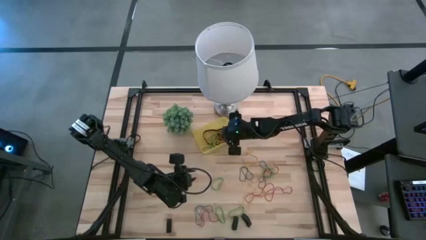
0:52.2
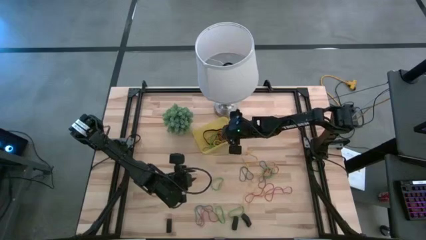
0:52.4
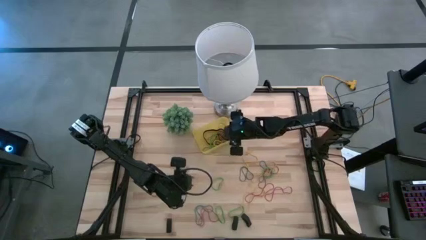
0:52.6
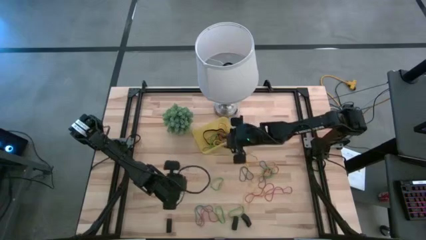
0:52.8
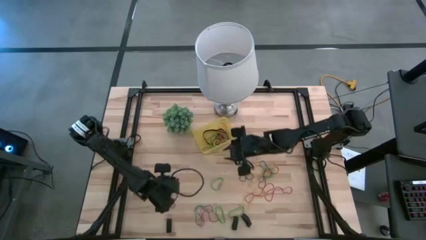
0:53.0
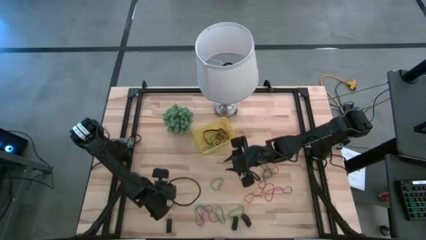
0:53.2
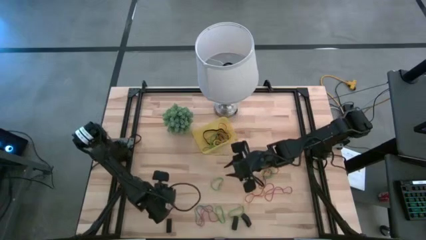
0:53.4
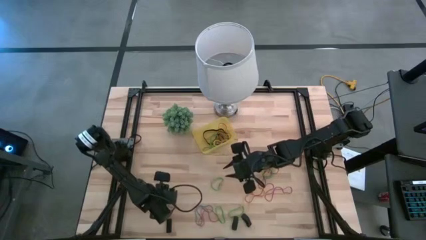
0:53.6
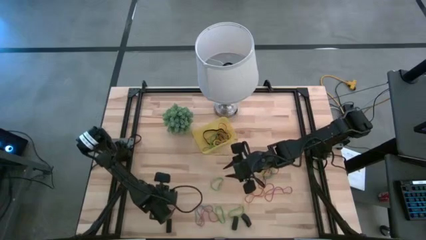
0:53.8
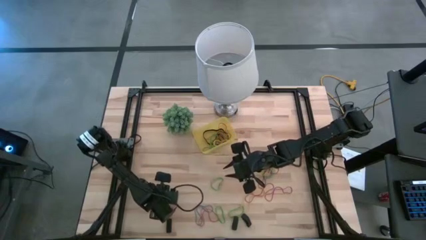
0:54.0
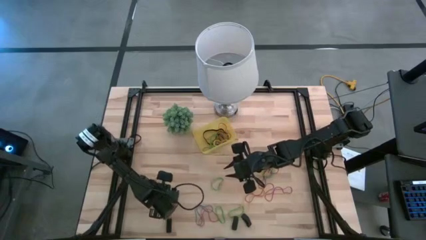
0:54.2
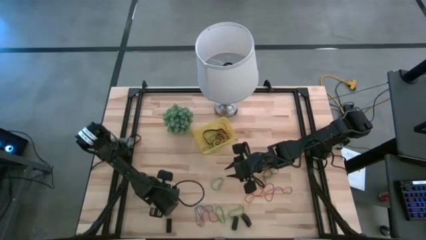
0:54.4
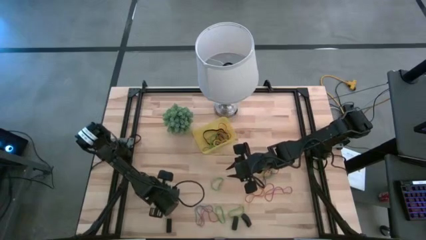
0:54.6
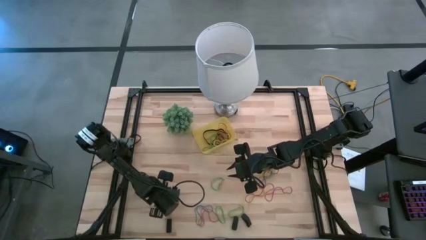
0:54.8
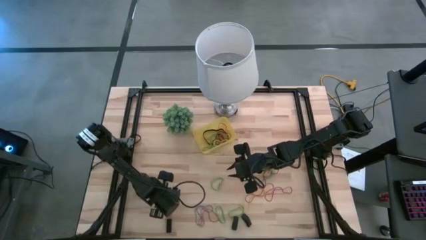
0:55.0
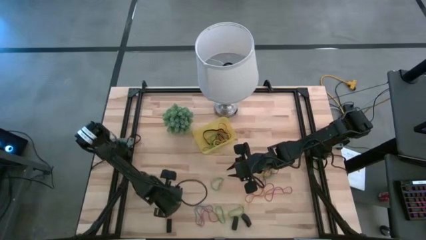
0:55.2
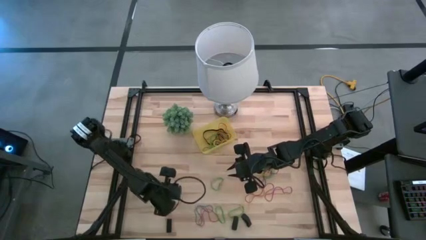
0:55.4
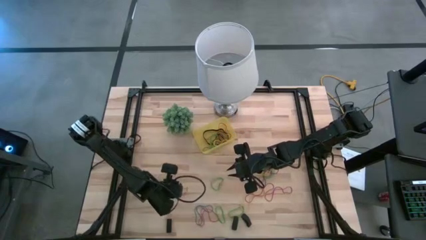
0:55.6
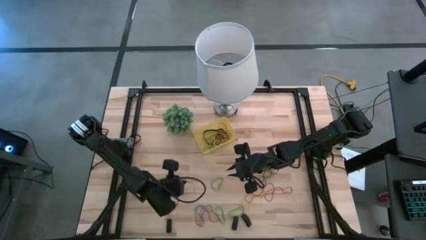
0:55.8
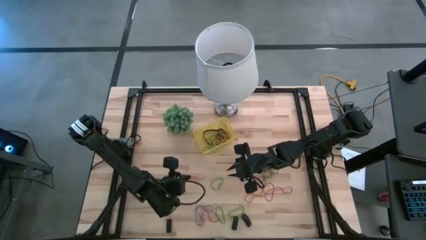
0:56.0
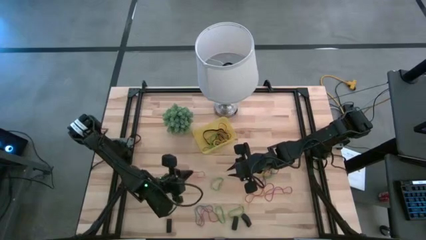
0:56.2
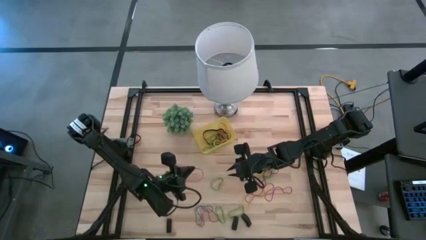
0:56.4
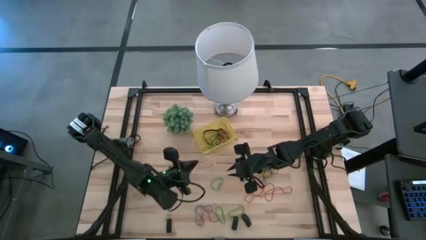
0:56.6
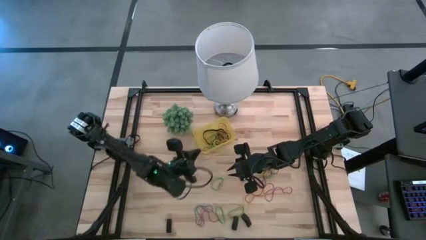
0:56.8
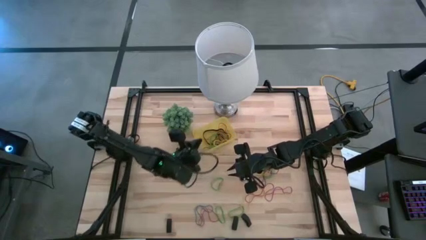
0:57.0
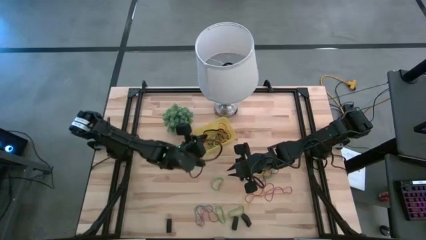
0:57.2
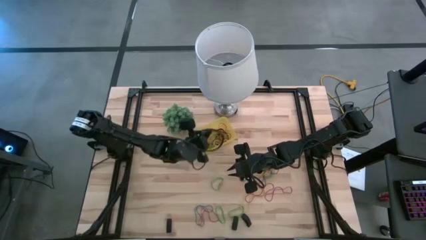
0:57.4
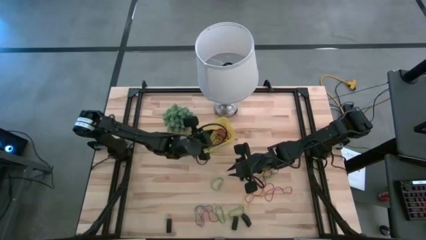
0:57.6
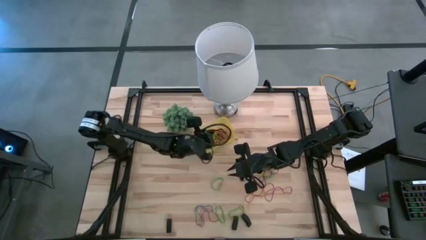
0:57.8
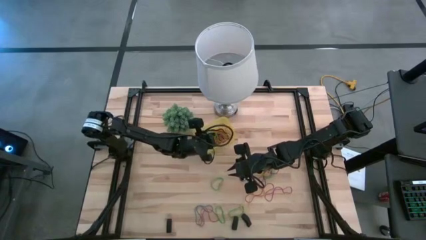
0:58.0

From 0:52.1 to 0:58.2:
Task: Pick and place rubber bands into bin
Put the red rubber band into the yellow bin

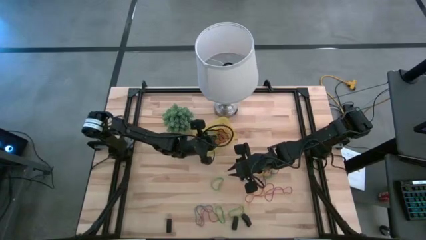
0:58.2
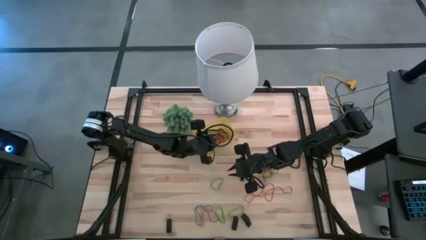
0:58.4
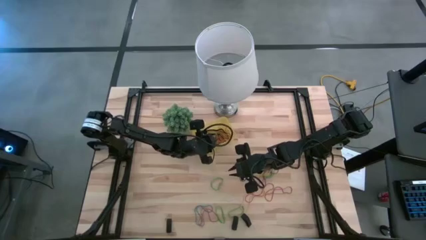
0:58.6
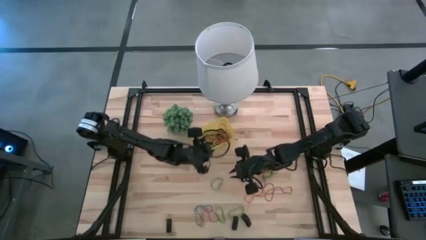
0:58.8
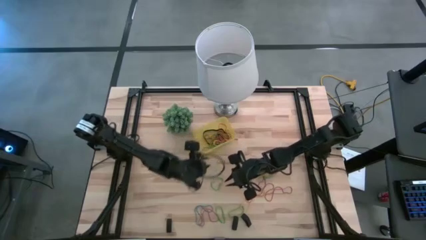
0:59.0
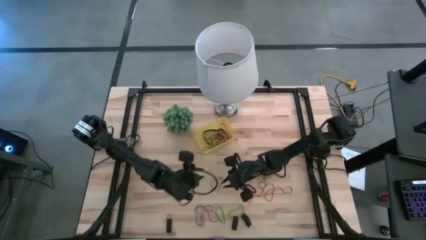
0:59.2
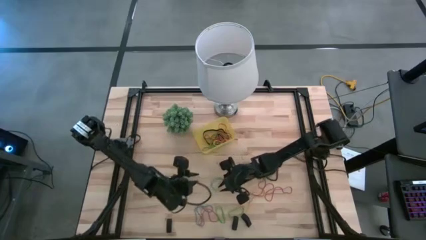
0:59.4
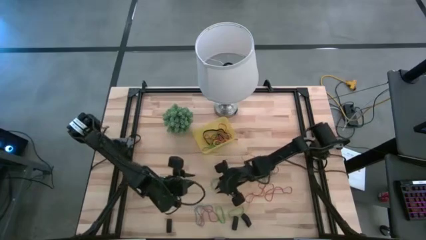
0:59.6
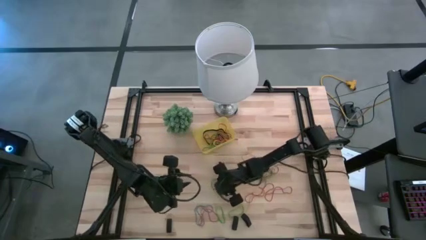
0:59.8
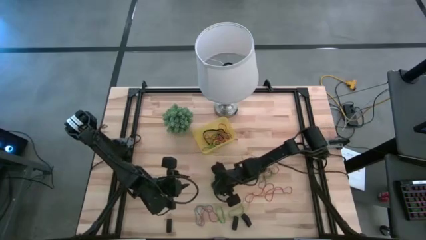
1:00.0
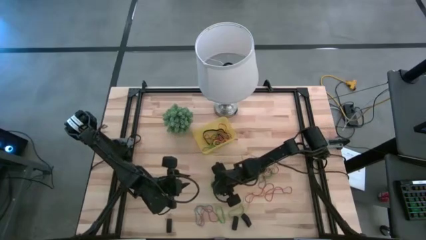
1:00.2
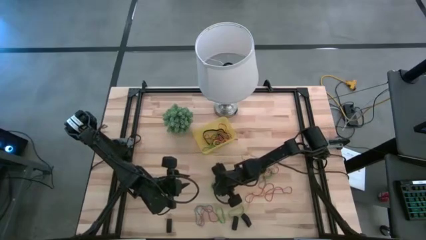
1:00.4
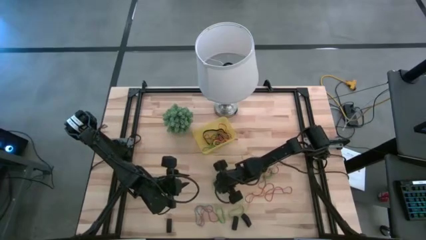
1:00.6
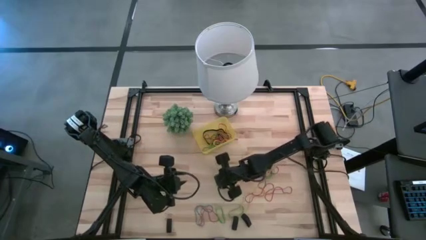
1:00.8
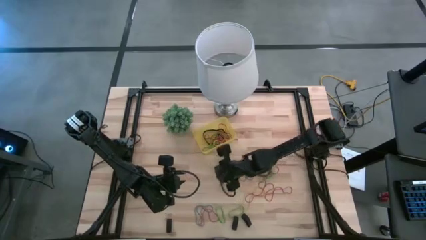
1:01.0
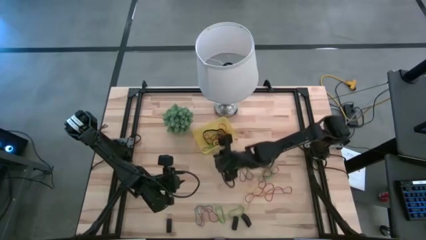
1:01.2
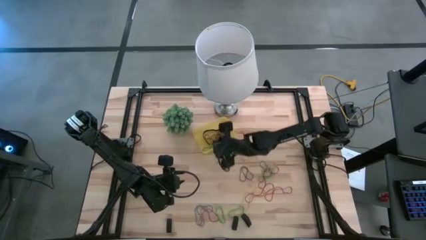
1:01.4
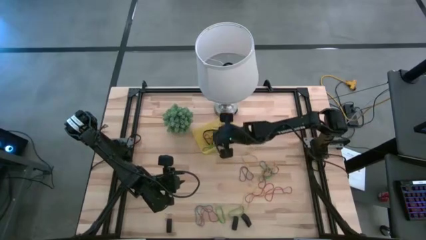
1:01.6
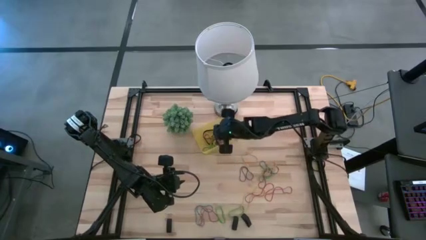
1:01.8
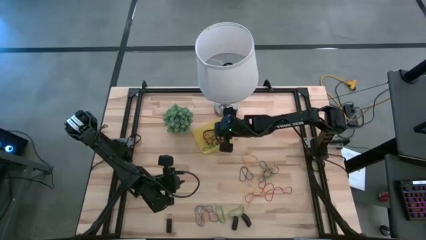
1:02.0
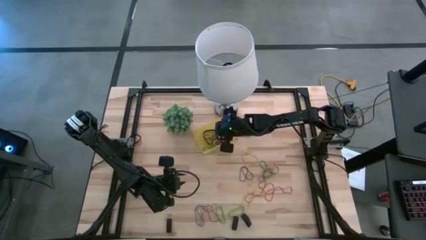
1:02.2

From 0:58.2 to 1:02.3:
Put the green rubber band into the yellow bin

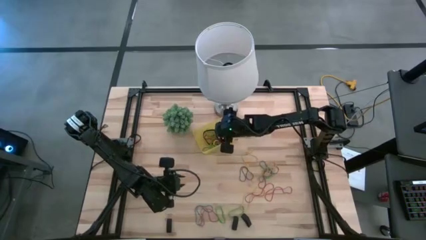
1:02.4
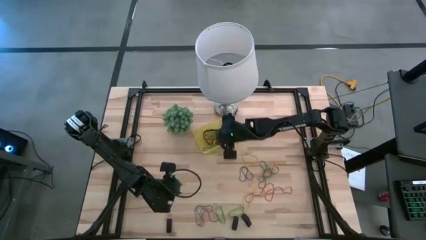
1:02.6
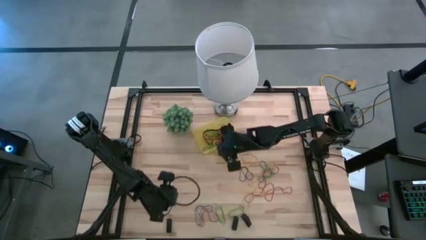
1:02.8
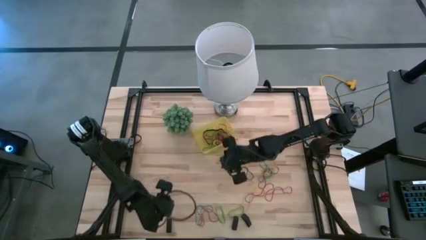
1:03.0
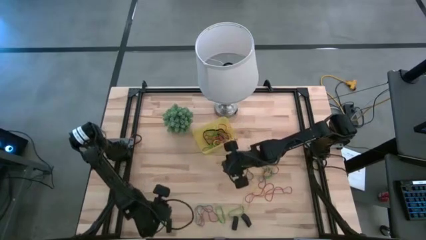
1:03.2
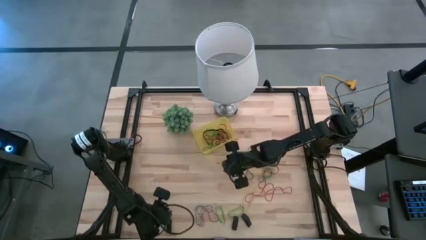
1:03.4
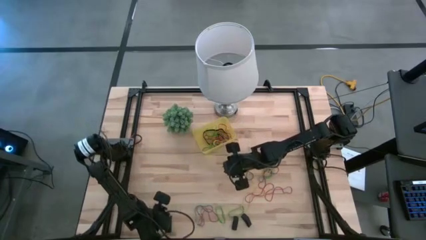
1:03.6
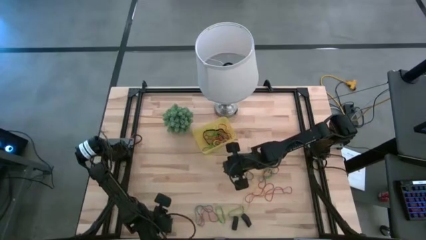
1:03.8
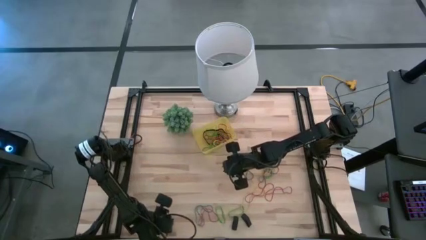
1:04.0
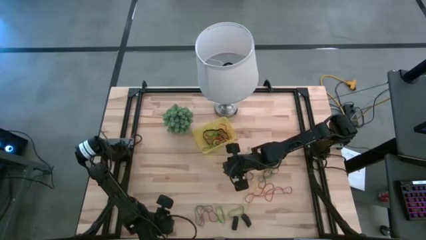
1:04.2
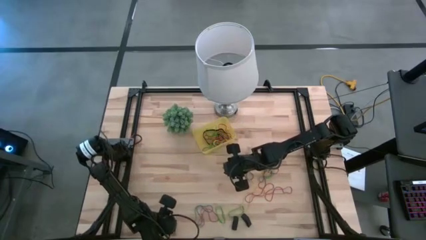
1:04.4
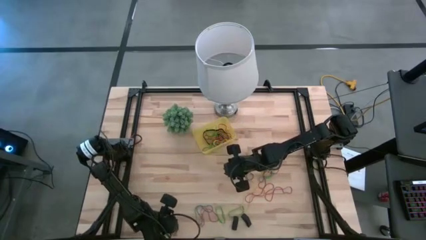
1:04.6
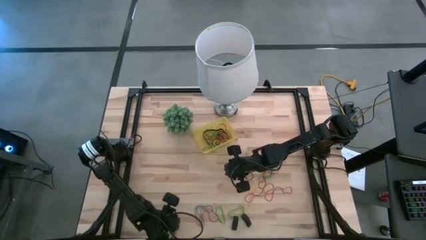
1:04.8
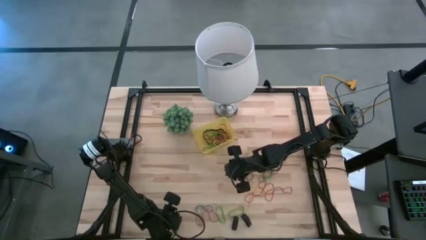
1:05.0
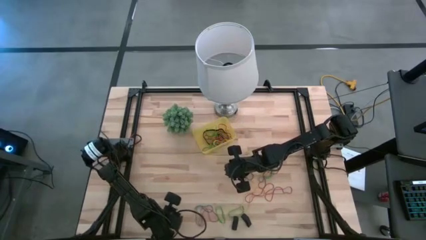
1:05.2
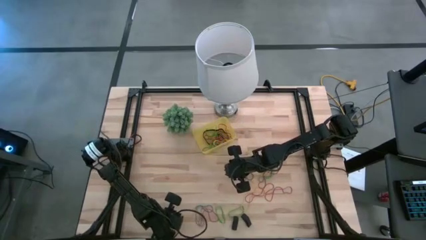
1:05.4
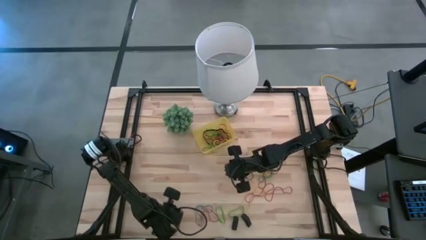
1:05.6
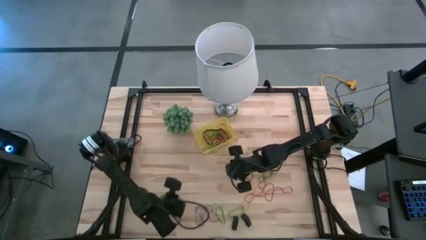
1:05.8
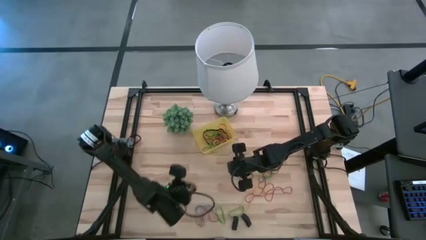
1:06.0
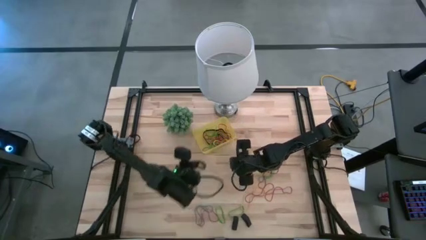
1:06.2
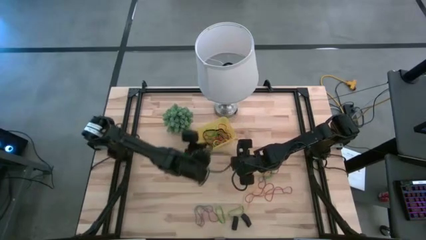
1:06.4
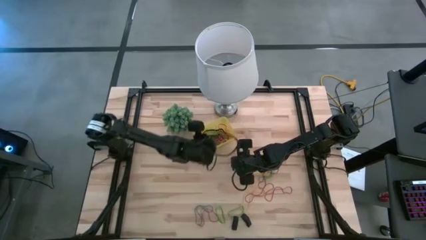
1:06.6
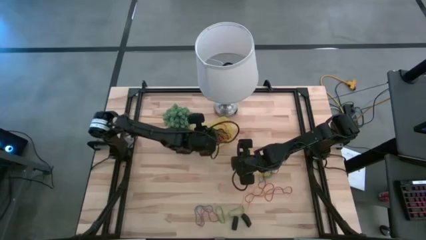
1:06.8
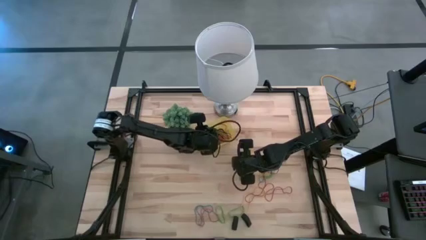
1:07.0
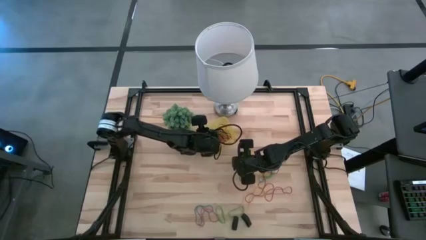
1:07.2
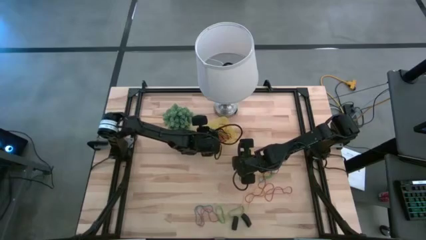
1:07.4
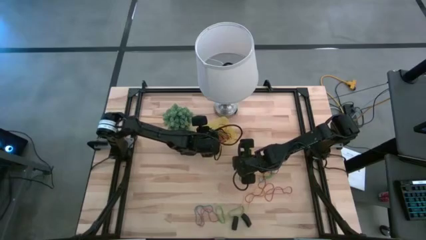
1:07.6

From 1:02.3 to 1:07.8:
Put the left black rubber band into the yellow bin

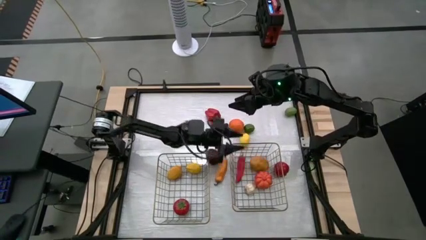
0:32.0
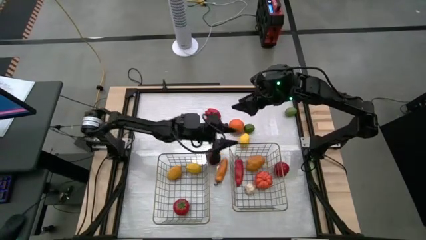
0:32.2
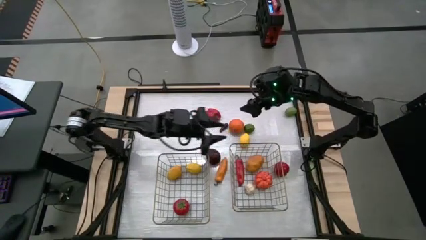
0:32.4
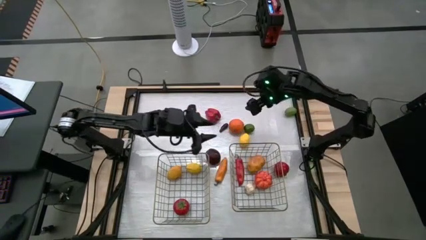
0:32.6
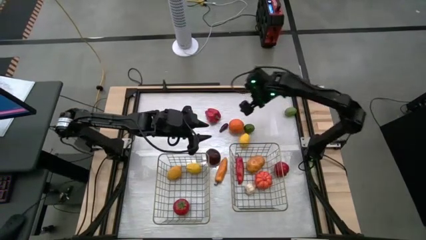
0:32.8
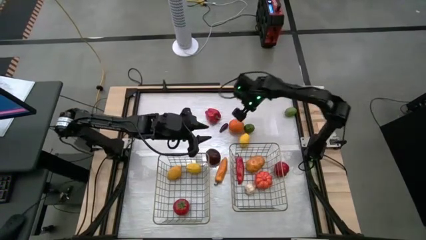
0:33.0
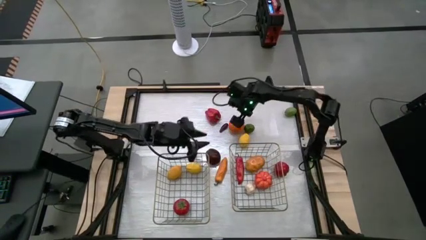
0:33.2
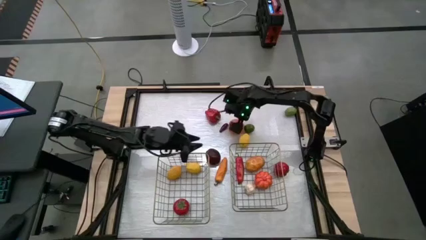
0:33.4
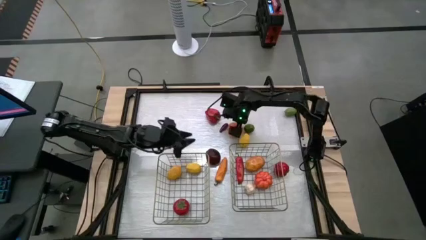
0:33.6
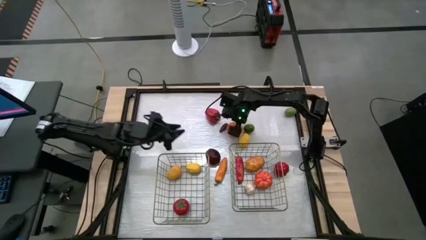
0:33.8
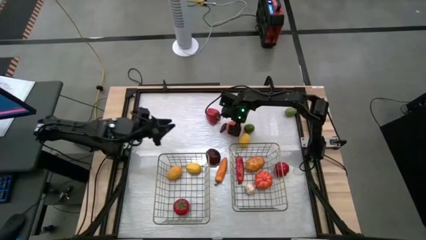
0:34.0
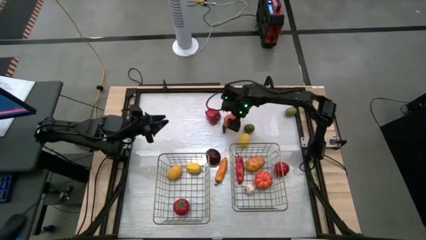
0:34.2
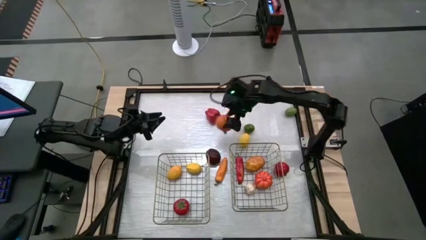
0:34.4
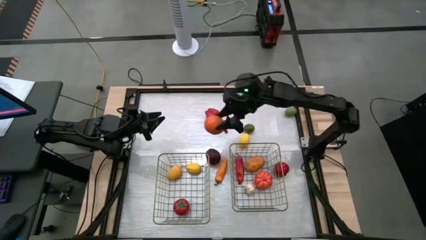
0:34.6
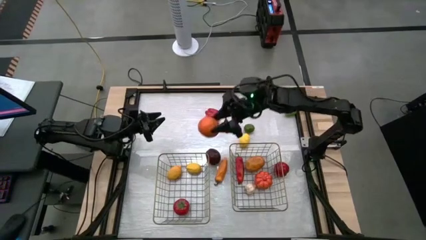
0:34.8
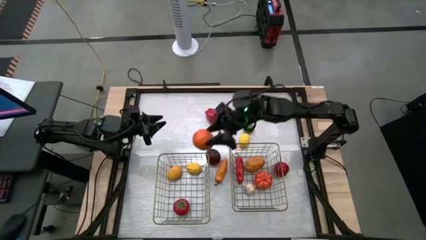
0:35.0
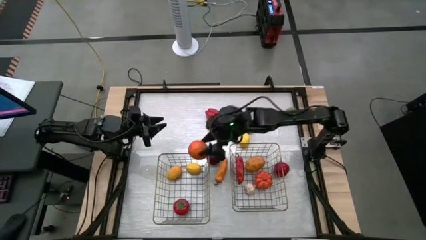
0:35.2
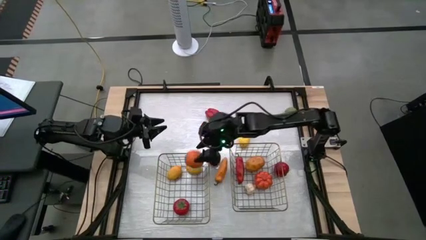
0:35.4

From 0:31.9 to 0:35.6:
Task: Sort produce into baskets
Put the orange into the left brown wire basket
